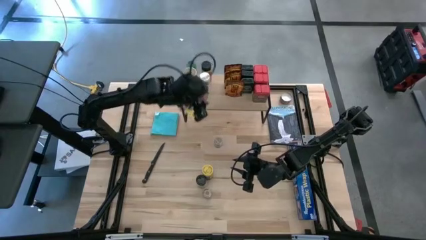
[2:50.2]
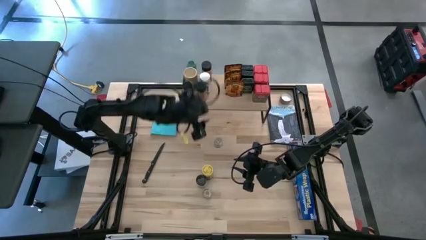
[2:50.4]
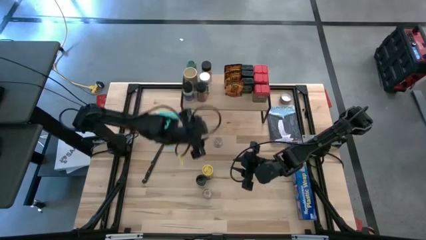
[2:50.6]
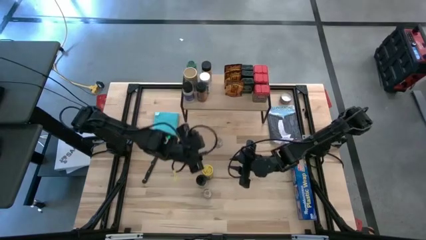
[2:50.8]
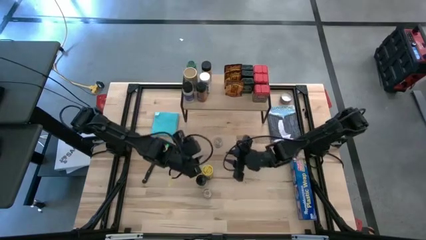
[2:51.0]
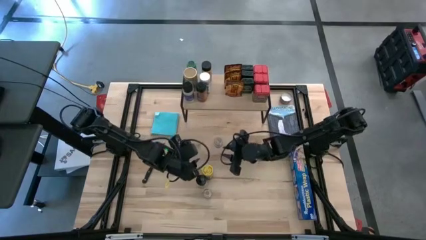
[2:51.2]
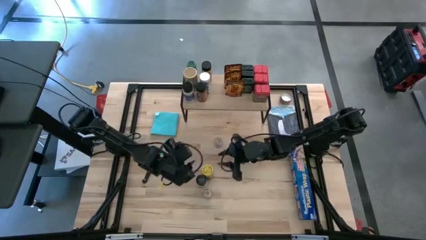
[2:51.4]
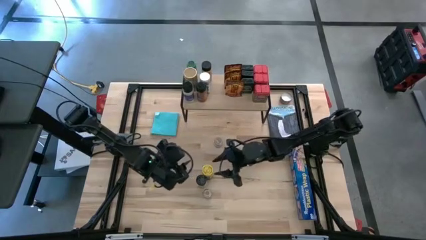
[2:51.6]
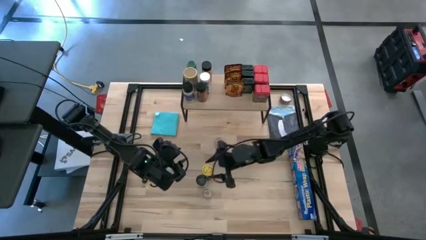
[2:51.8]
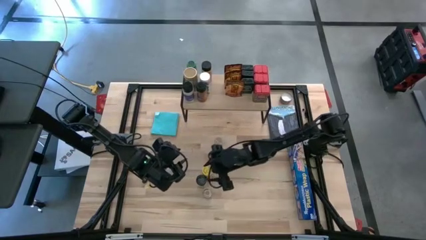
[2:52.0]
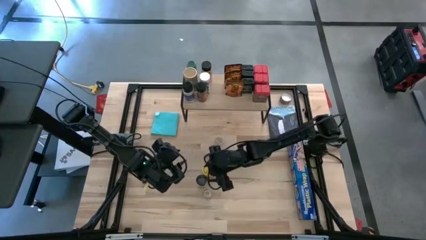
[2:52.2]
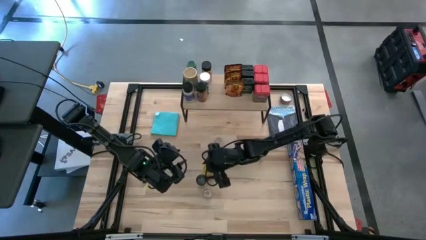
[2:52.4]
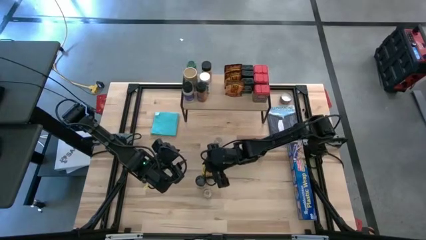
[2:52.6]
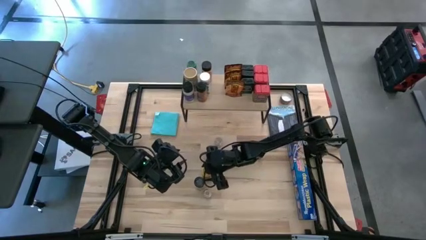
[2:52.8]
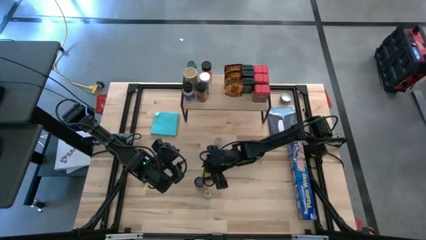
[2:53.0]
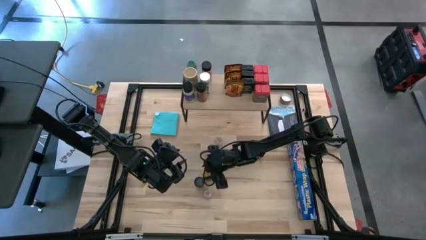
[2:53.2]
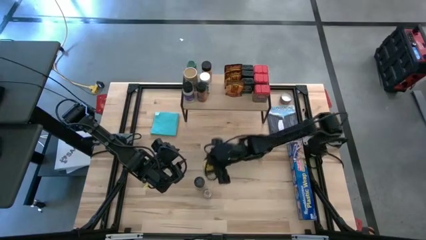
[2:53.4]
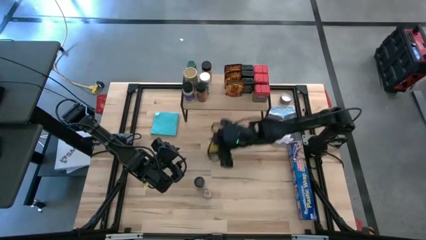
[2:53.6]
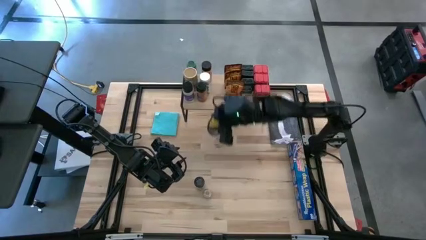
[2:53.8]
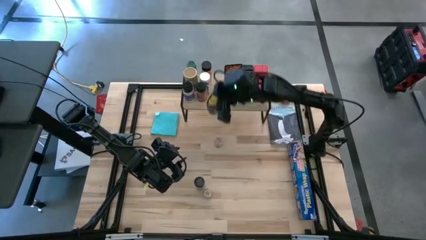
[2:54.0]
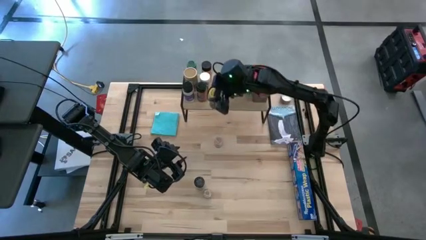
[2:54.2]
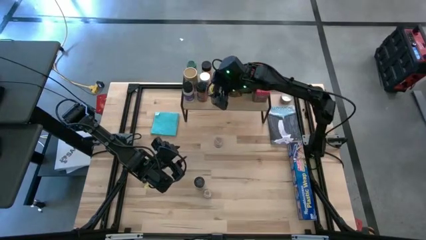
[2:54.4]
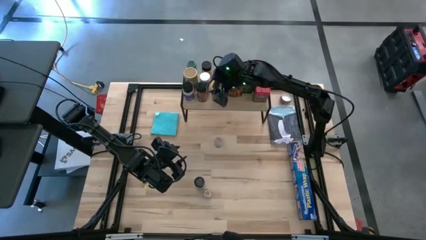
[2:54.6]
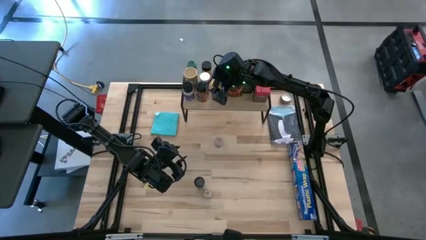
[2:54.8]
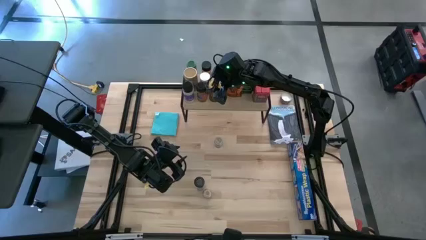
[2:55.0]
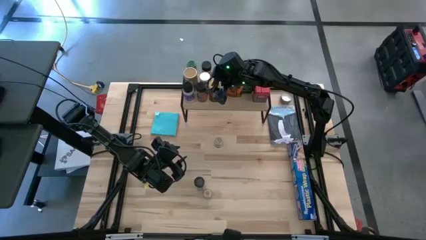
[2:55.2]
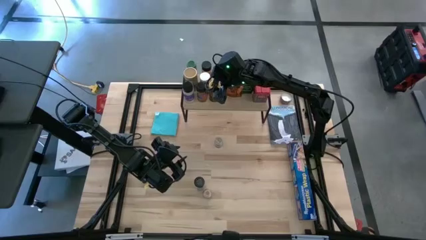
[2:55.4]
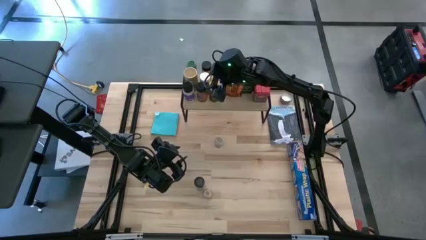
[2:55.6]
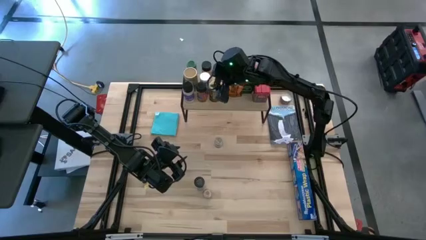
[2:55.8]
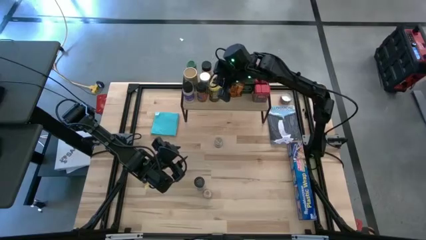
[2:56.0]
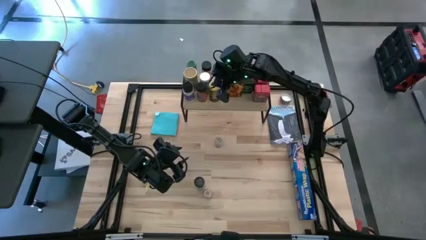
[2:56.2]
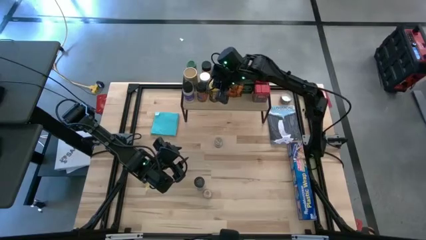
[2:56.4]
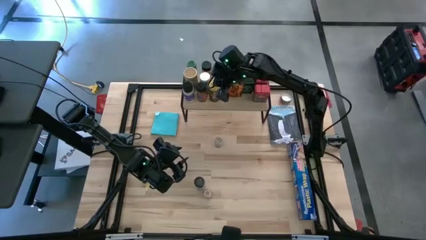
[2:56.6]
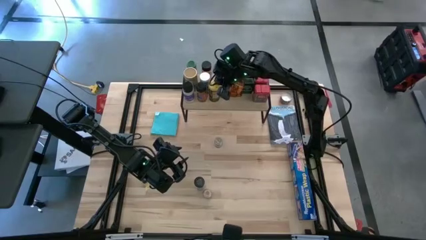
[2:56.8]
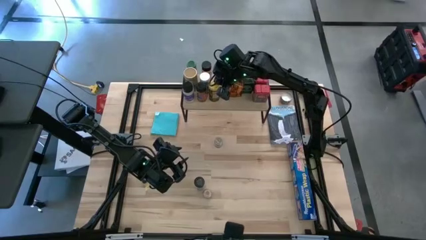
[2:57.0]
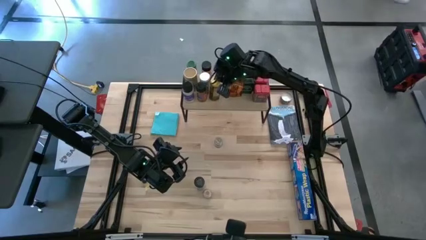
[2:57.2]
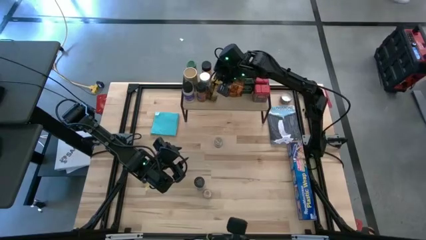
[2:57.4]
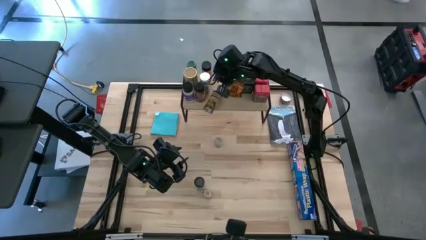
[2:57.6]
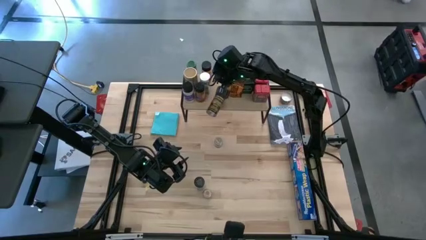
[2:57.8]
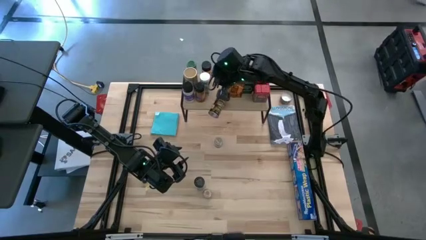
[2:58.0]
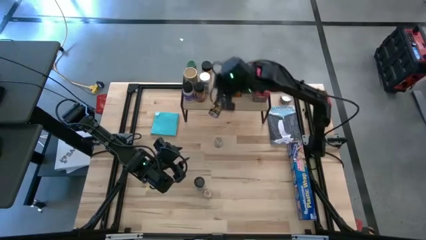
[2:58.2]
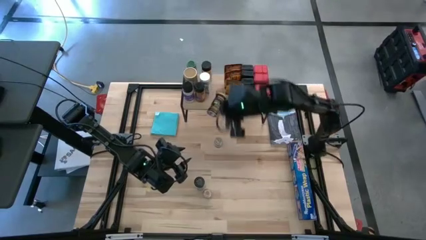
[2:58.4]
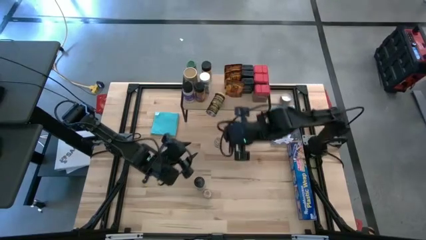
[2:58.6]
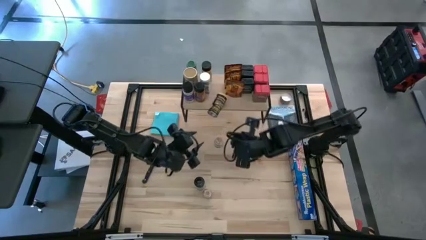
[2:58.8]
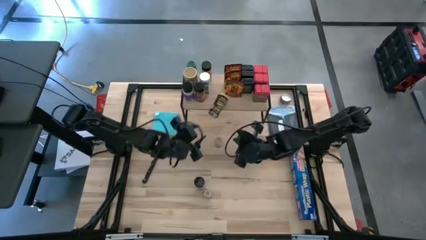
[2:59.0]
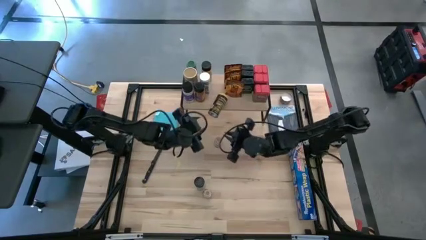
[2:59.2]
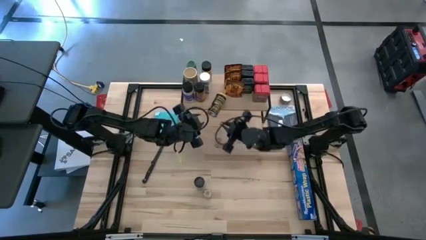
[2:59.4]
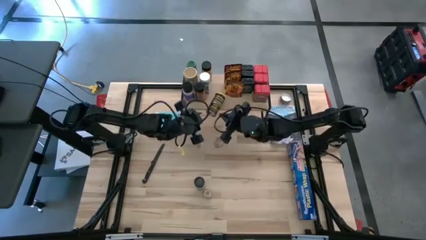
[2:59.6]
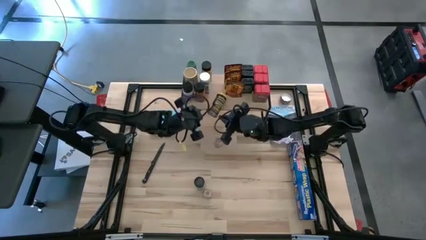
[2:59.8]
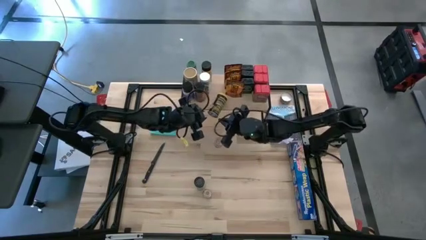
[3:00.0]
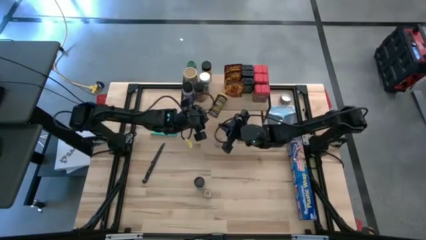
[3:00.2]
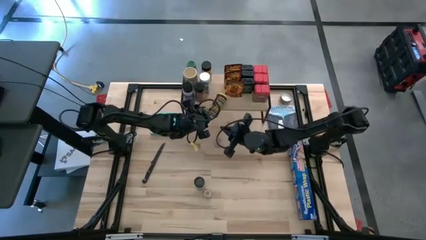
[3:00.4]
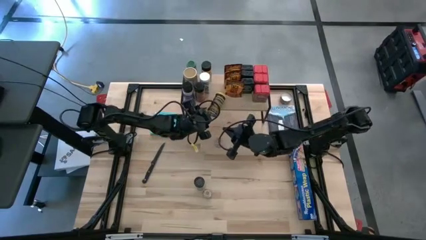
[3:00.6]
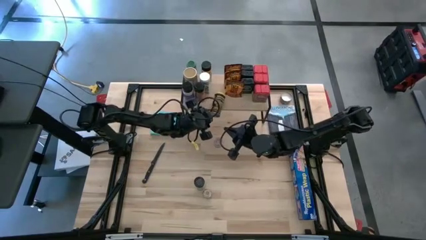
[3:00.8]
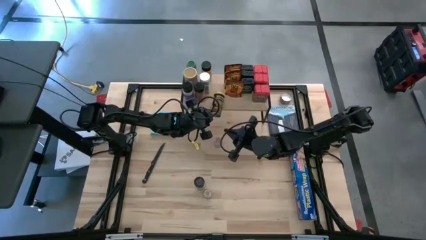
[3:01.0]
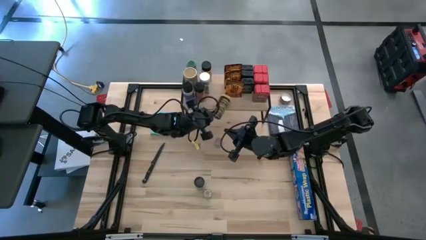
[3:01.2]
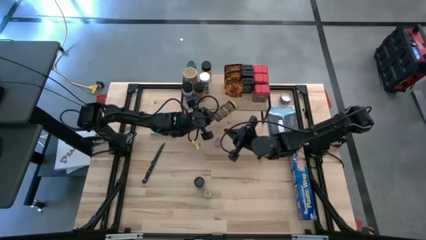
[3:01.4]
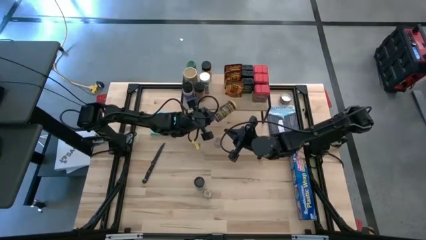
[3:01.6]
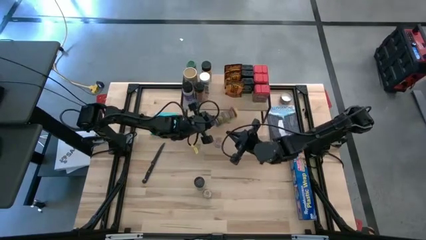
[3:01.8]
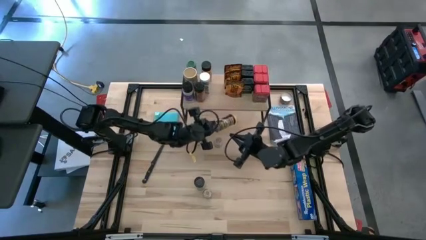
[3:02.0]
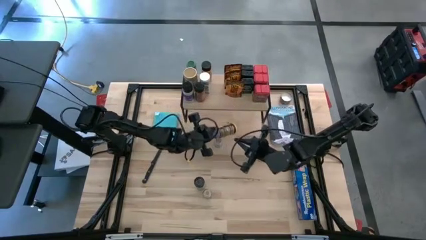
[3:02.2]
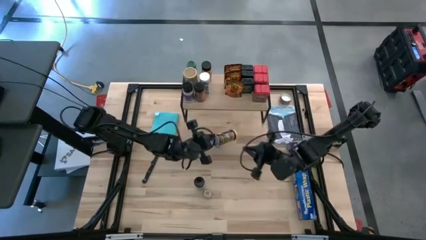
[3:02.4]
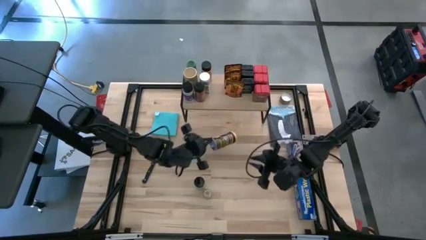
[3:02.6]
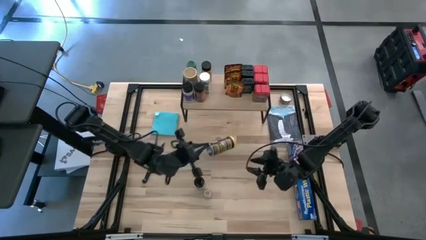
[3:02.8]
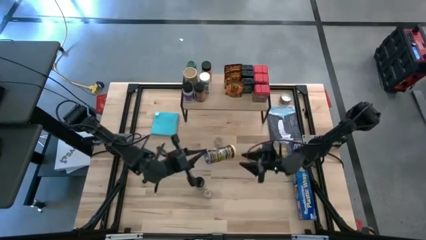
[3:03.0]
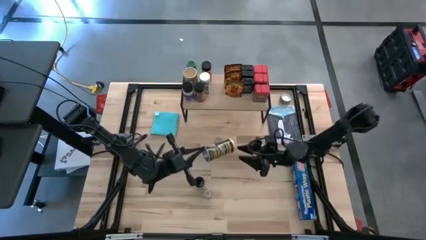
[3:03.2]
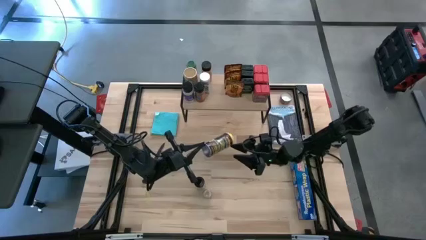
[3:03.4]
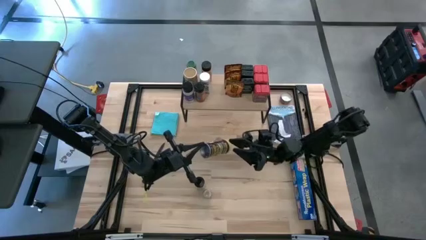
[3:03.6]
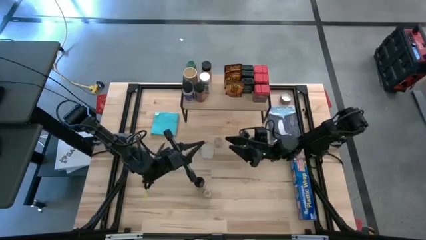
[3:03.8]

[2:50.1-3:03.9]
Task: Shelf spices
Put the yellow seasoning bottle on the shelf

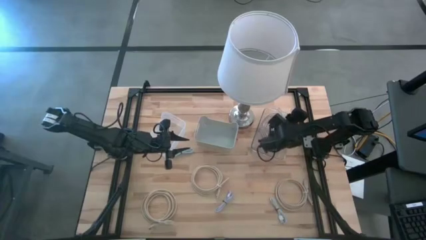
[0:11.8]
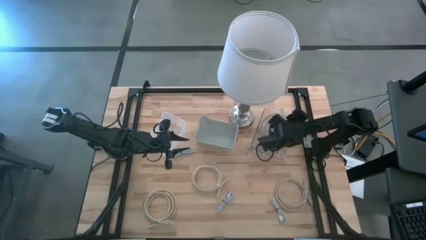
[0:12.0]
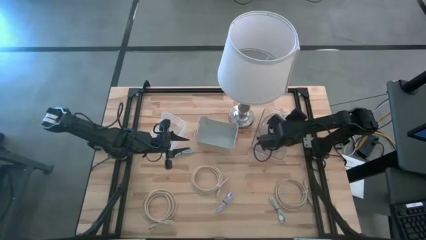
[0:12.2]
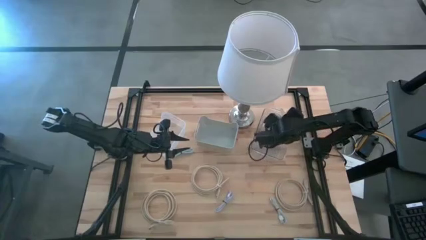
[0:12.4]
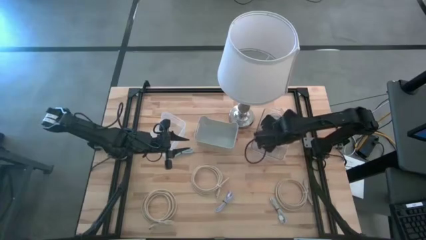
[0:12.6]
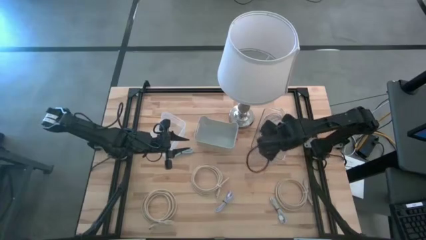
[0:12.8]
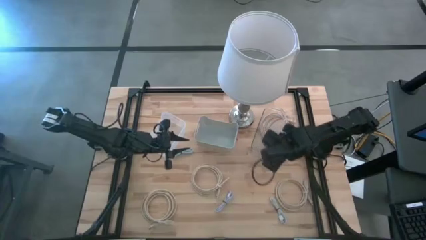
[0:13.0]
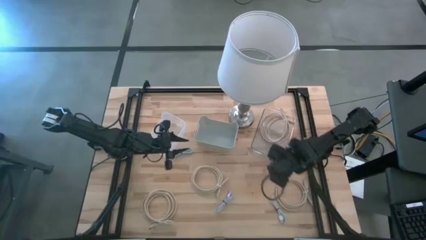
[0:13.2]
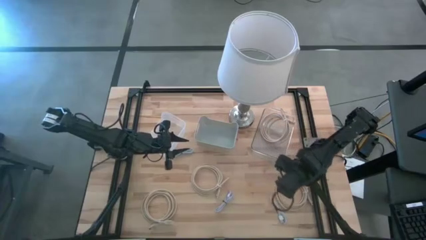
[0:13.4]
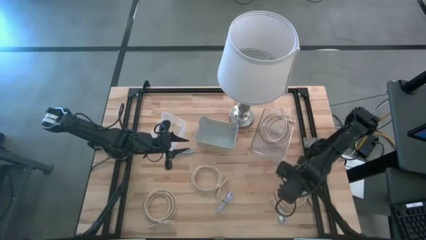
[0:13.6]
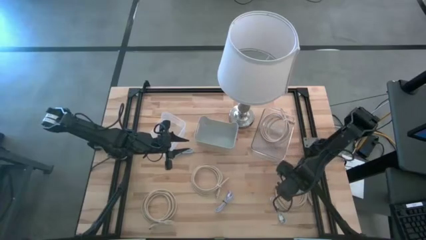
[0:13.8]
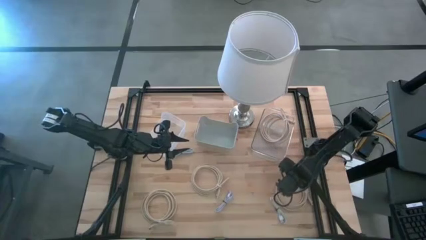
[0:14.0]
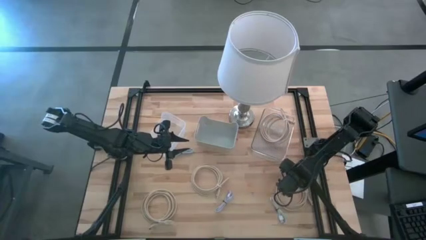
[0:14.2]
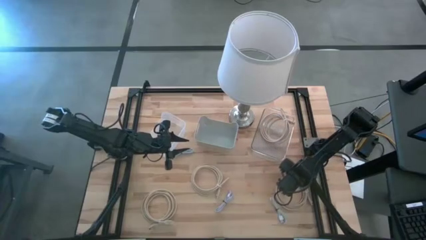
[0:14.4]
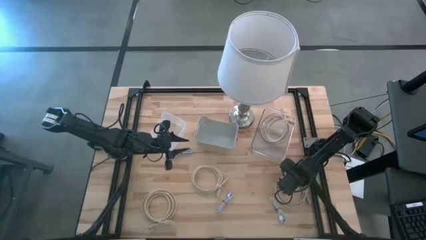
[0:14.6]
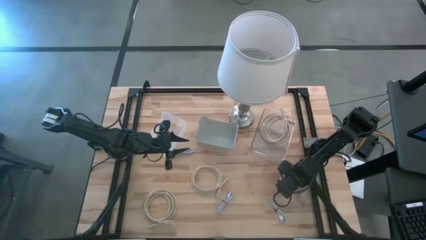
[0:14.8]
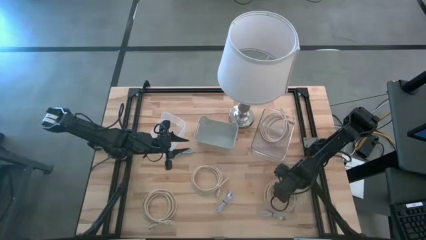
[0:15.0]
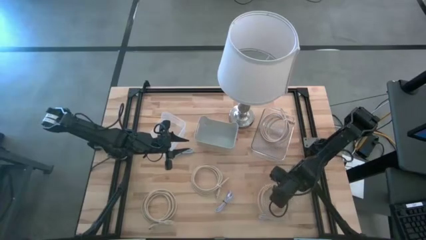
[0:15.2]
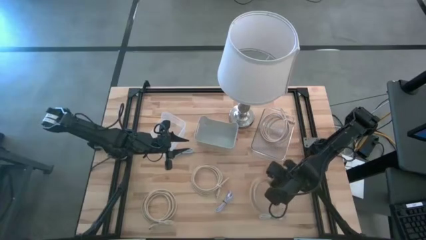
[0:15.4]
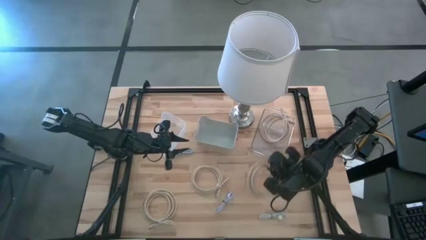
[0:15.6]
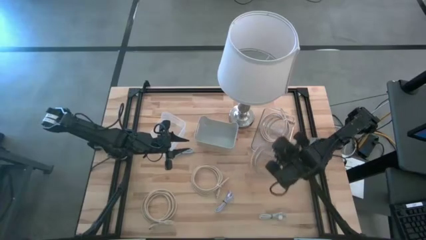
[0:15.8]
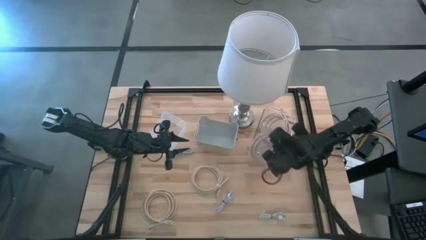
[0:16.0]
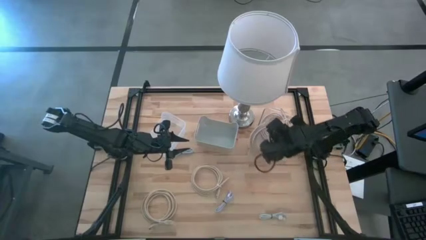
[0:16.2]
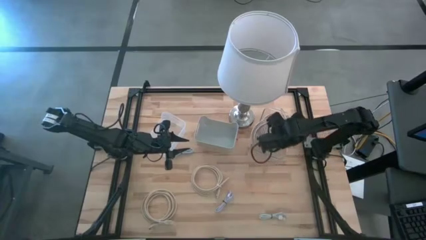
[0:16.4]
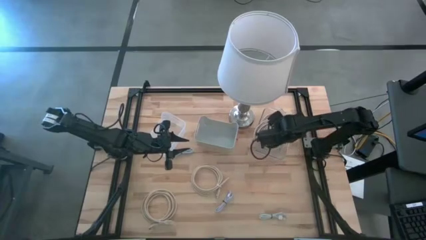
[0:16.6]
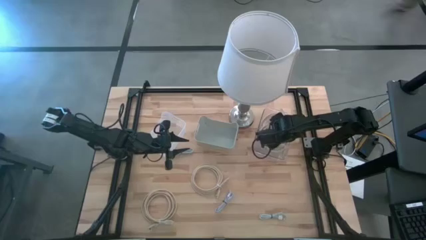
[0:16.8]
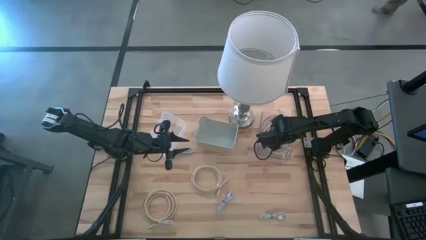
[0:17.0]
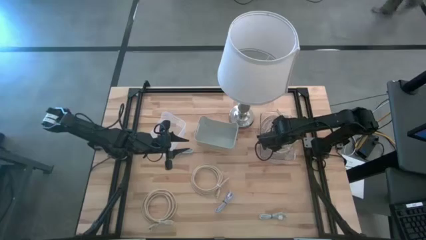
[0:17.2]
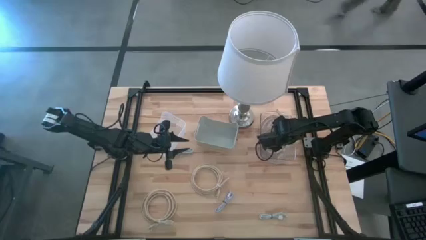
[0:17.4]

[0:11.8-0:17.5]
Task: Pick & Place USB Port
Put the bottom right light brown HDMI cable into the transparent bin
